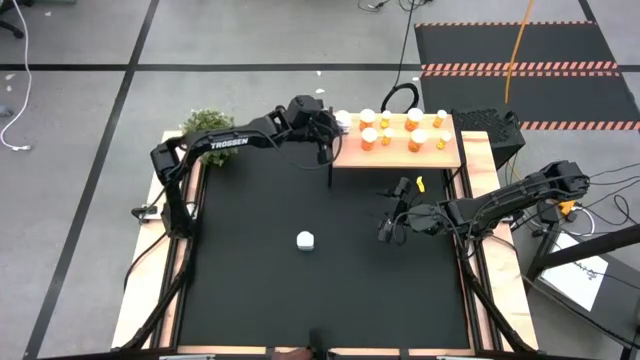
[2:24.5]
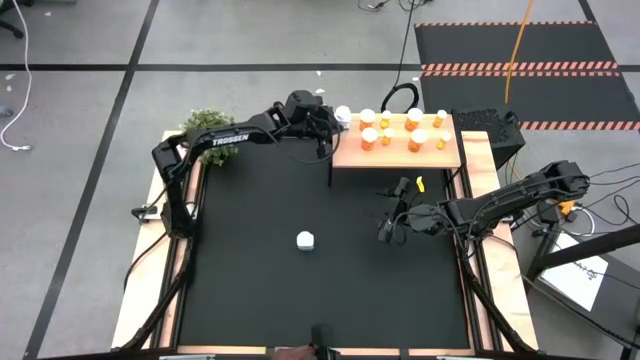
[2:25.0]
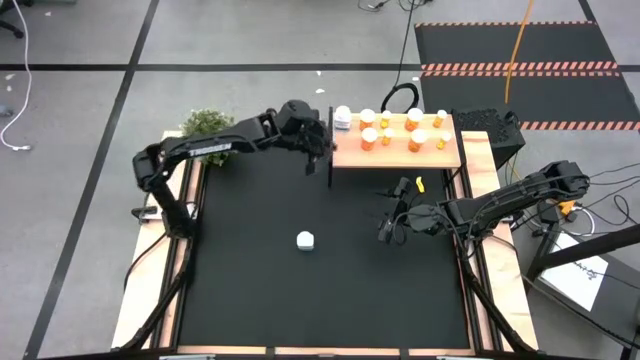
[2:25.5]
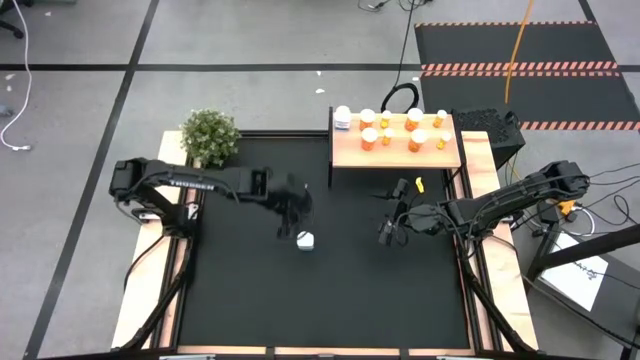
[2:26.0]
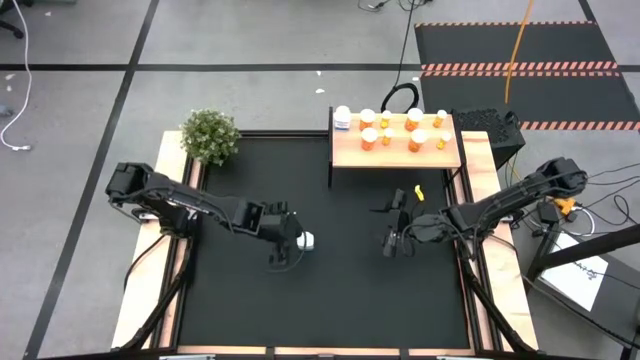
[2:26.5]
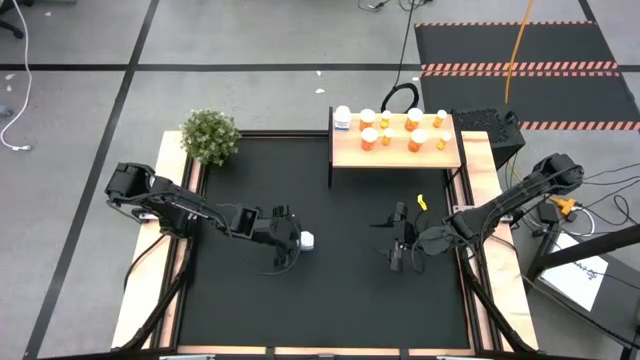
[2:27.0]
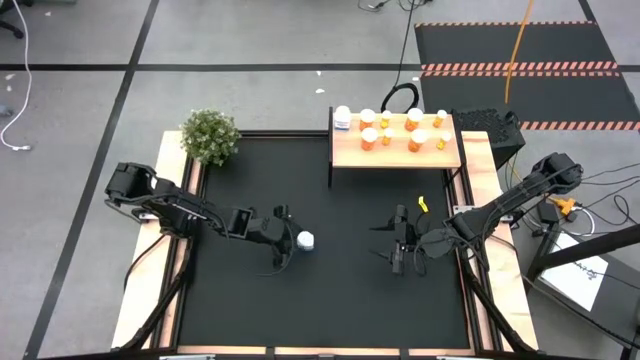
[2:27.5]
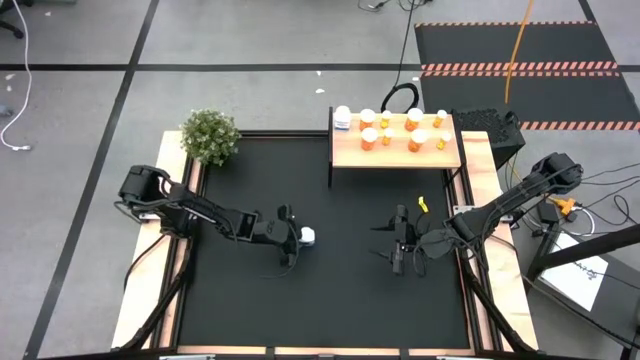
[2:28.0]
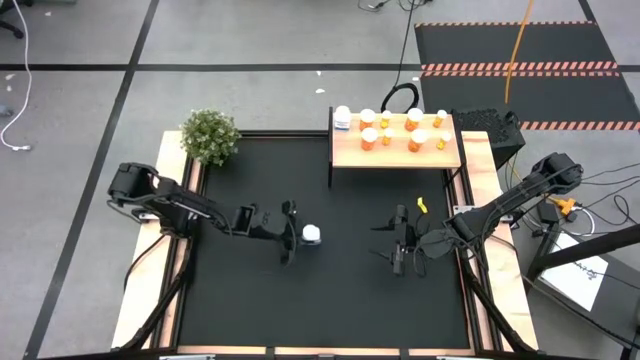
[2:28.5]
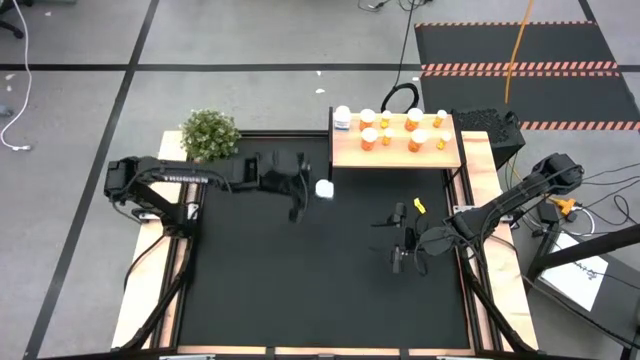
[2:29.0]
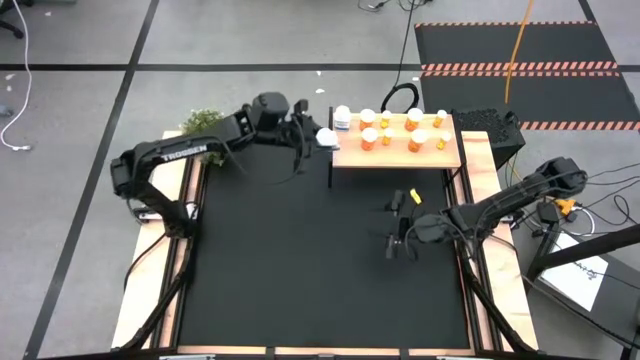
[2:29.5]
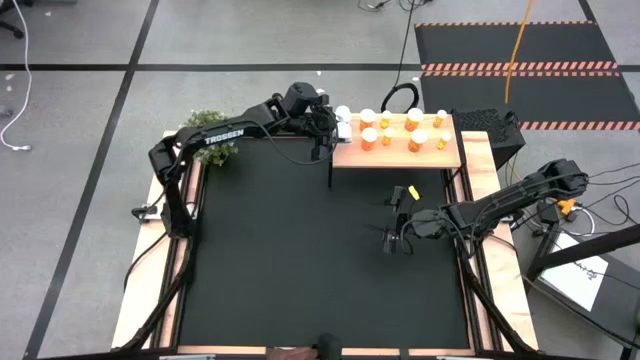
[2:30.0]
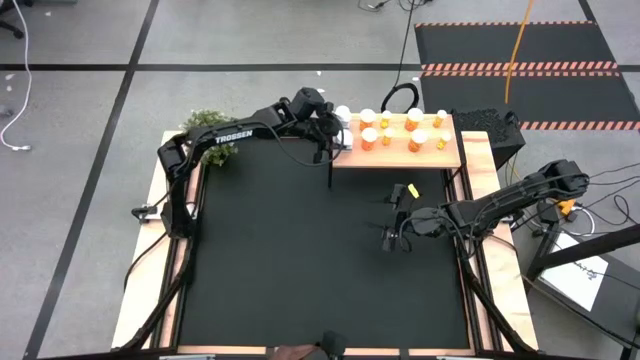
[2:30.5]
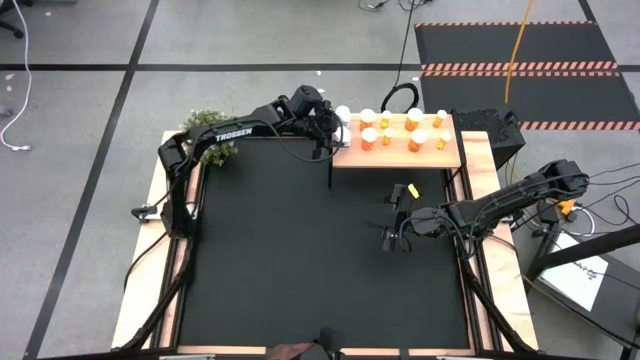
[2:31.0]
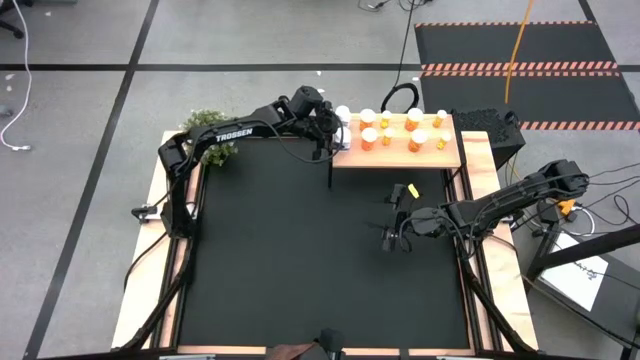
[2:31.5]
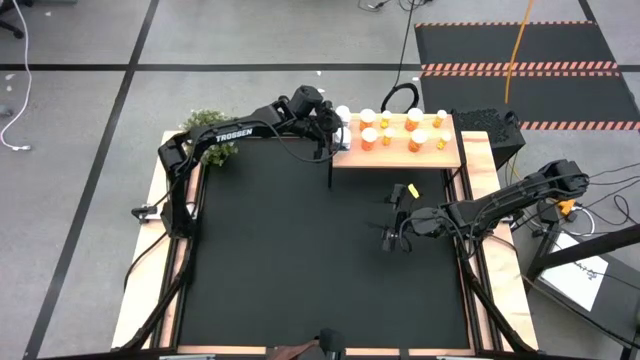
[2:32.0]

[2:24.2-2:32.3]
Task: Pick and place medicine bottles onto shelf by color
Put the large white pill bottle on the shelf

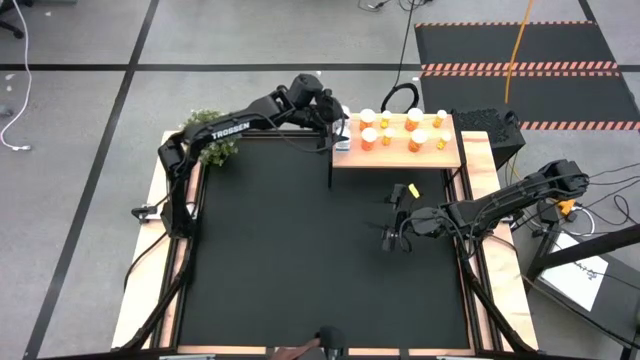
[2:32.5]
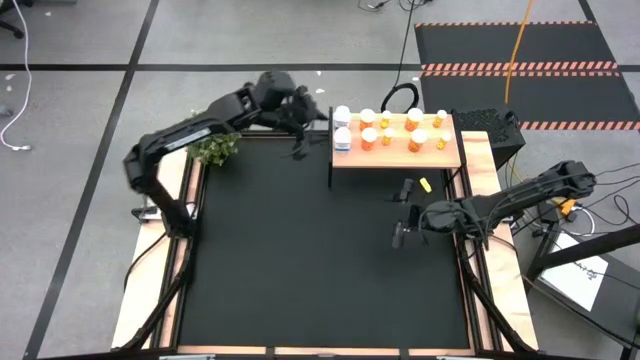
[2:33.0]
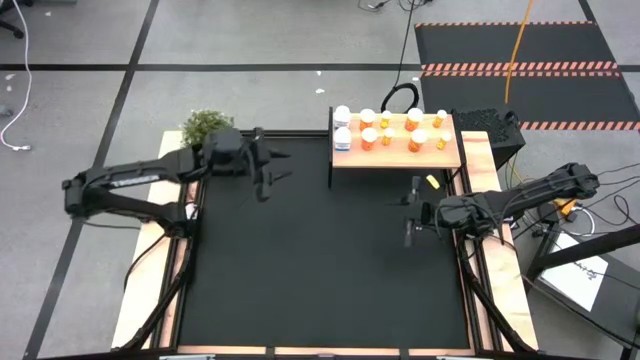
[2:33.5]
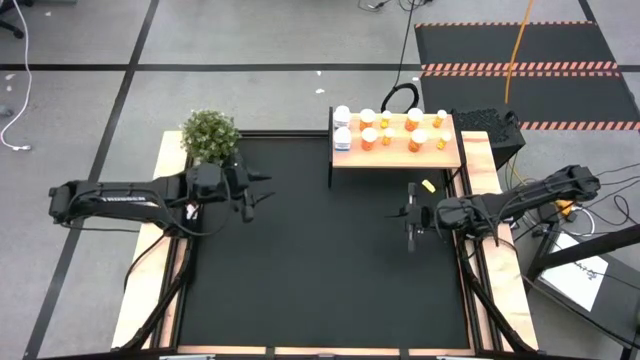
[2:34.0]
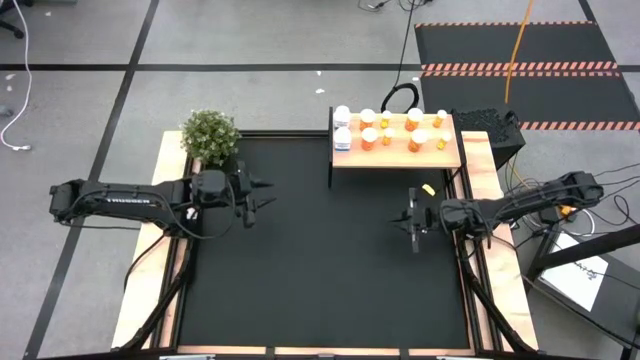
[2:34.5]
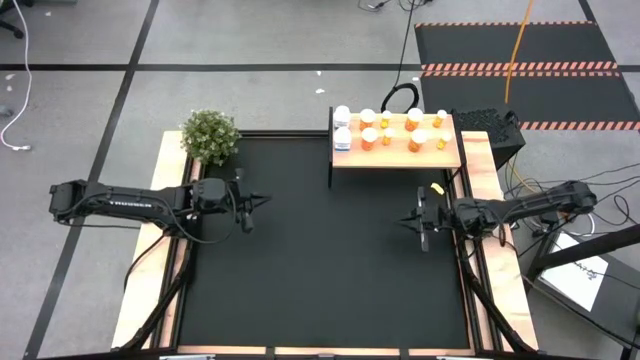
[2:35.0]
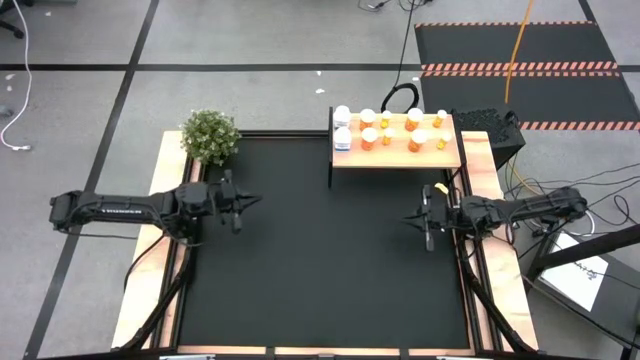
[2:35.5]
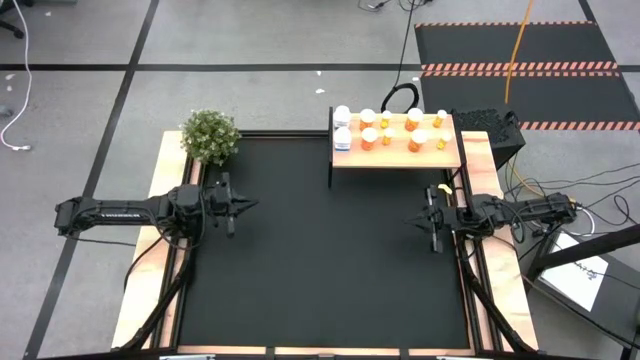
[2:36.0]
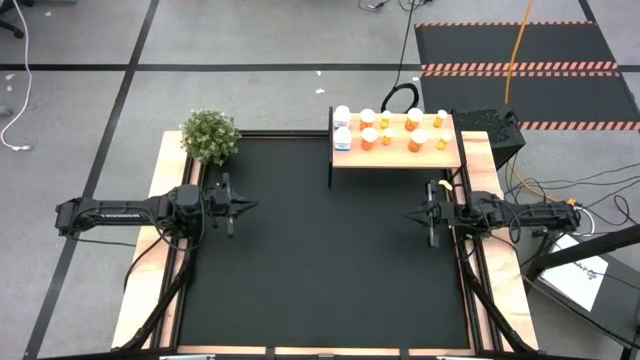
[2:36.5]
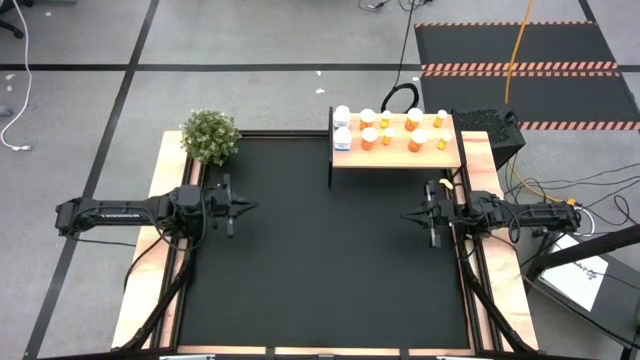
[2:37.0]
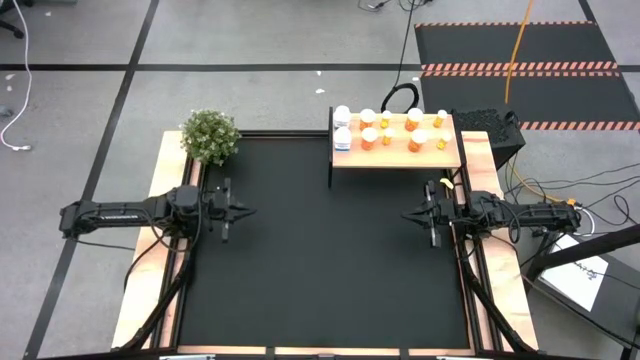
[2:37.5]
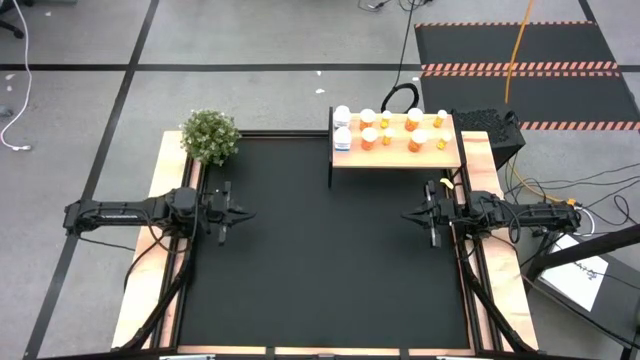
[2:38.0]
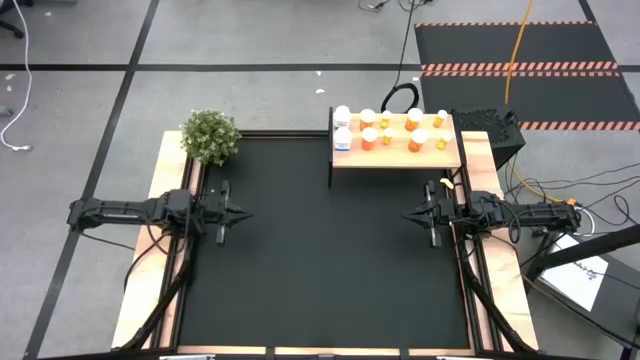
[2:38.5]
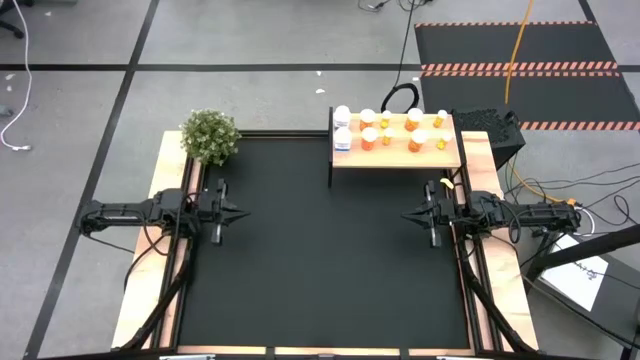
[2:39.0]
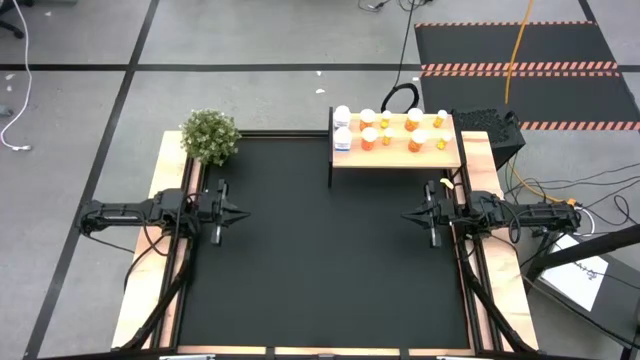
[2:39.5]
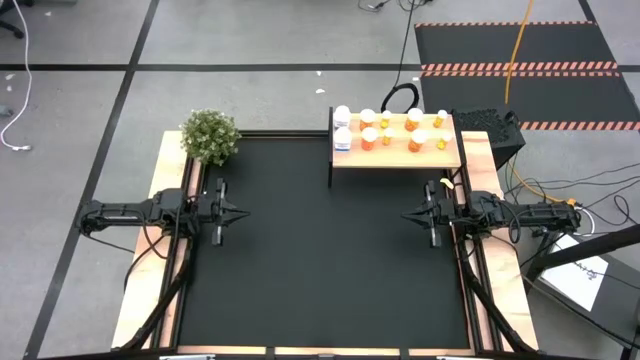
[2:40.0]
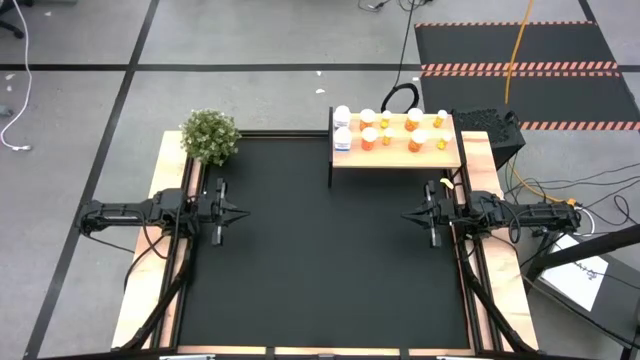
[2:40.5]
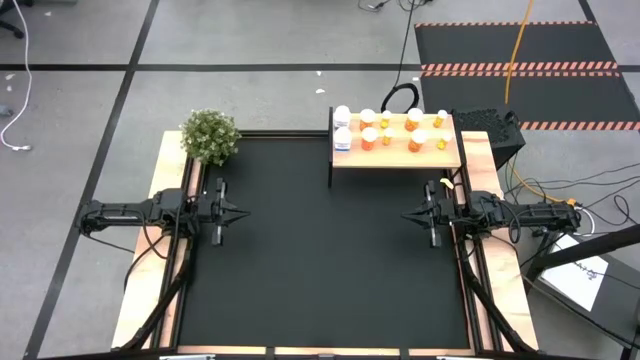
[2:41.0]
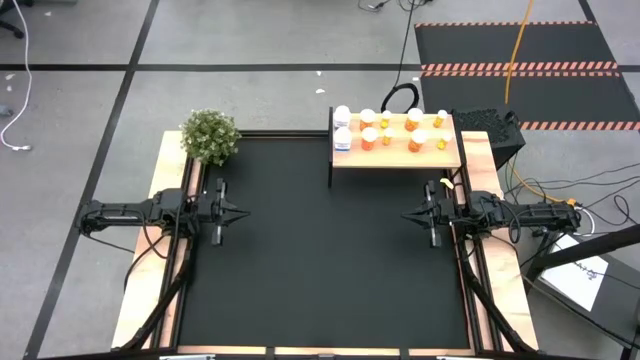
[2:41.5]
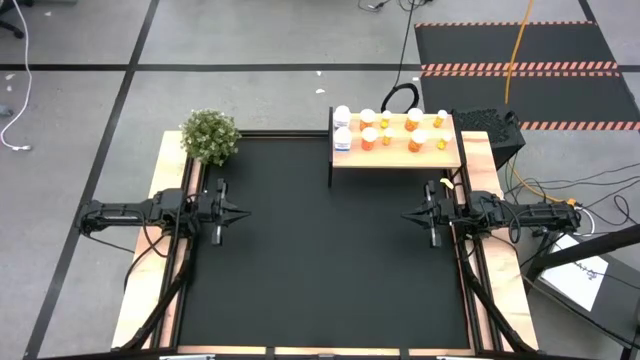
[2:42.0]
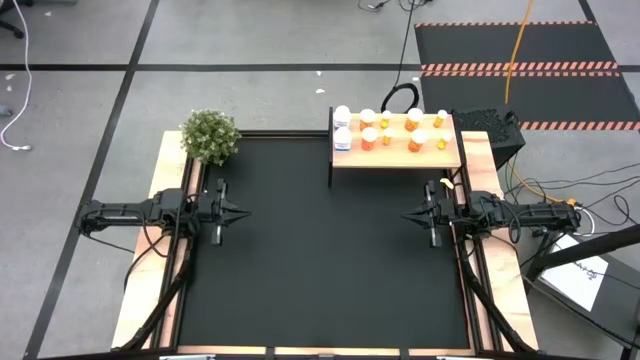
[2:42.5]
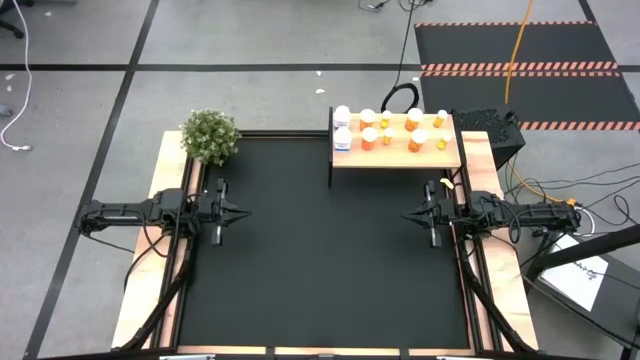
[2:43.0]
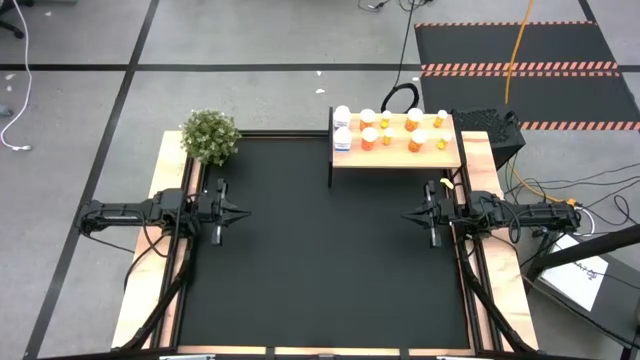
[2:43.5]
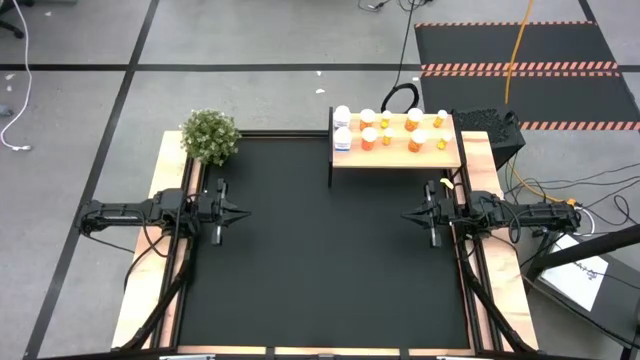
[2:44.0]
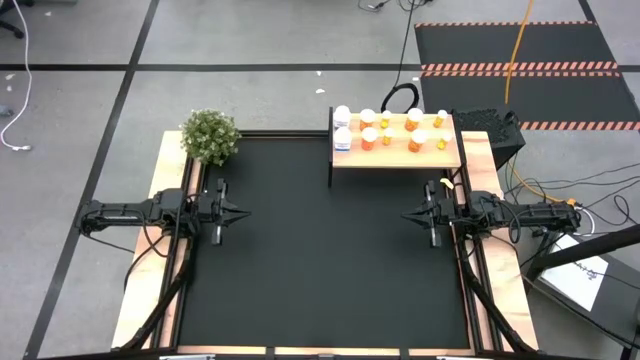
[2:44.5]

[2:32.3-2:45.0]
Return to Home Position
